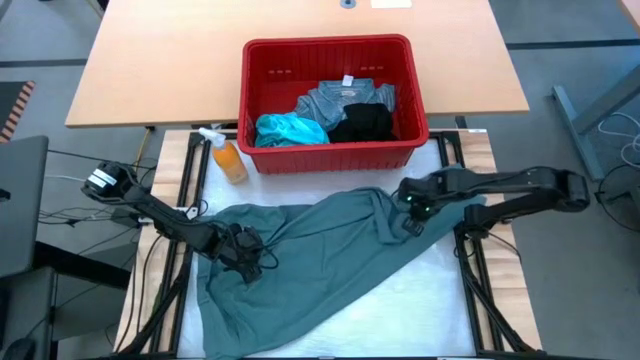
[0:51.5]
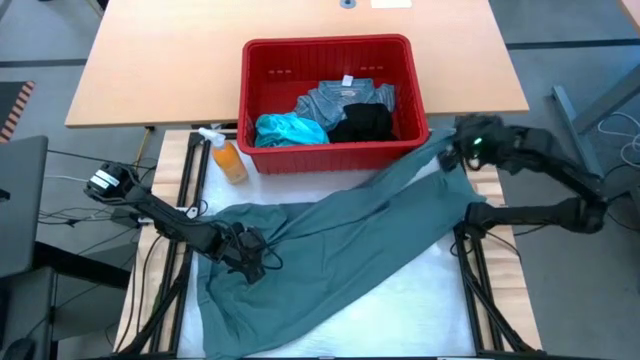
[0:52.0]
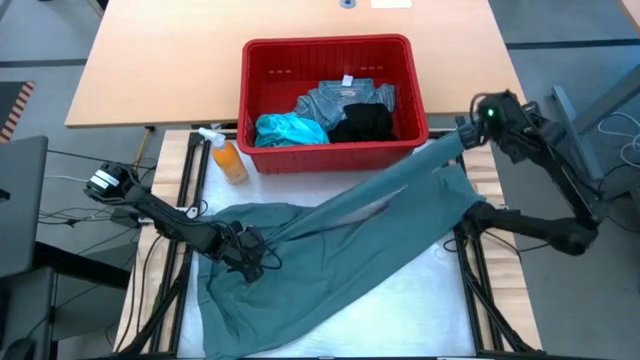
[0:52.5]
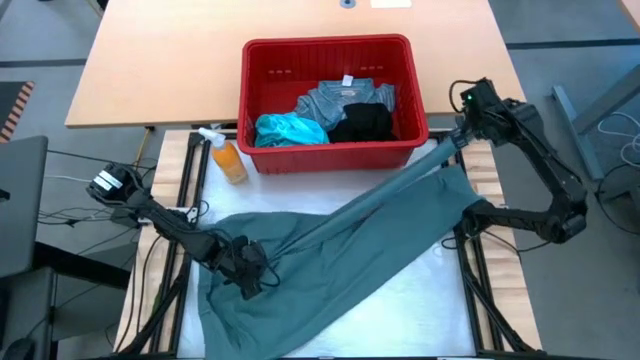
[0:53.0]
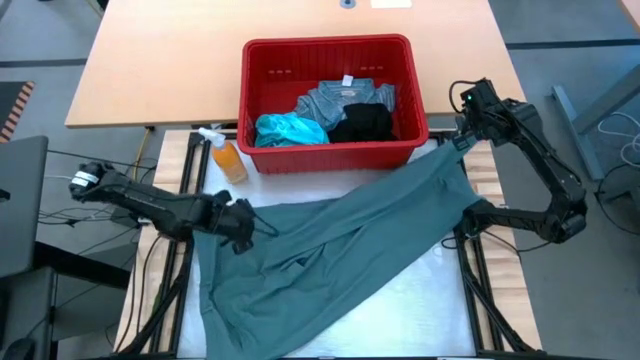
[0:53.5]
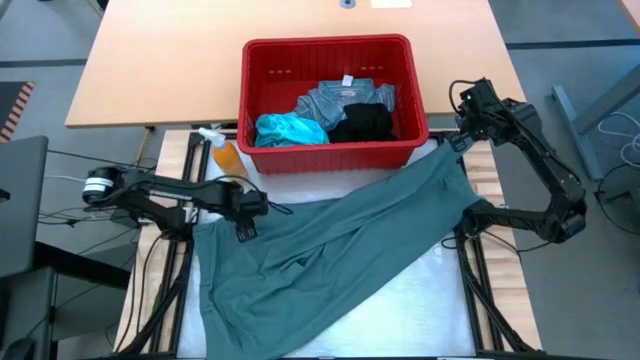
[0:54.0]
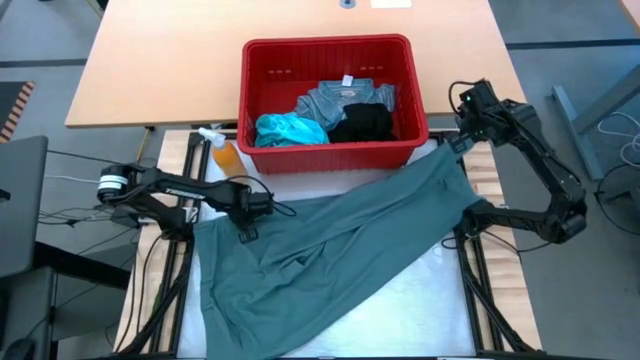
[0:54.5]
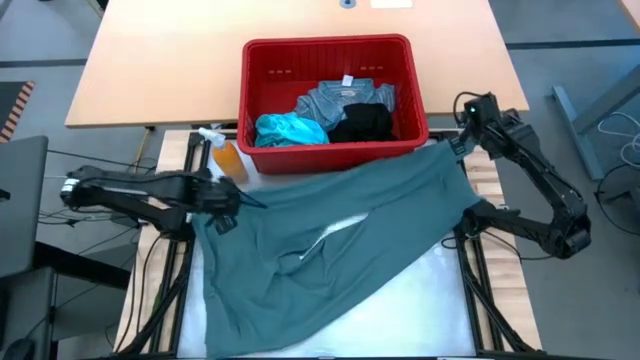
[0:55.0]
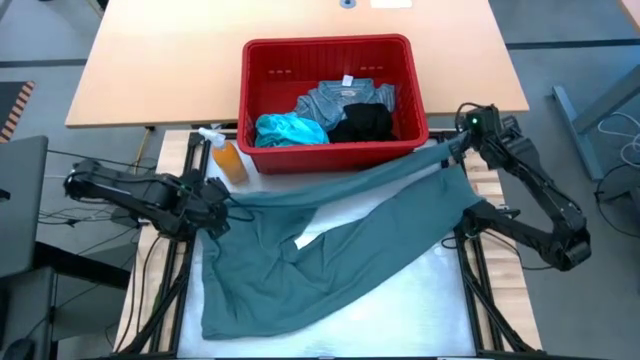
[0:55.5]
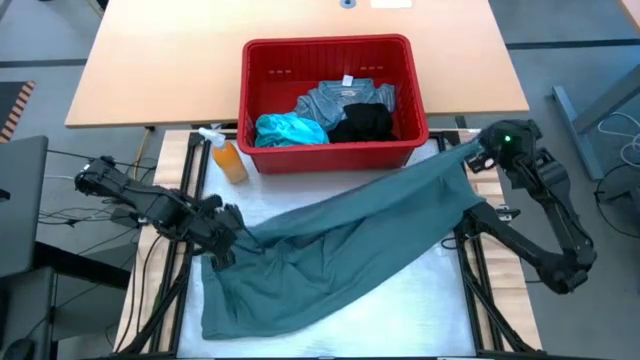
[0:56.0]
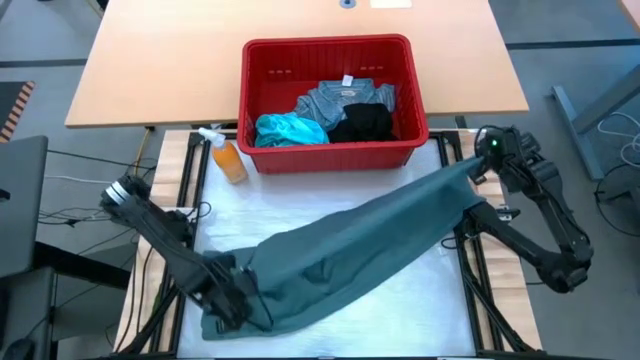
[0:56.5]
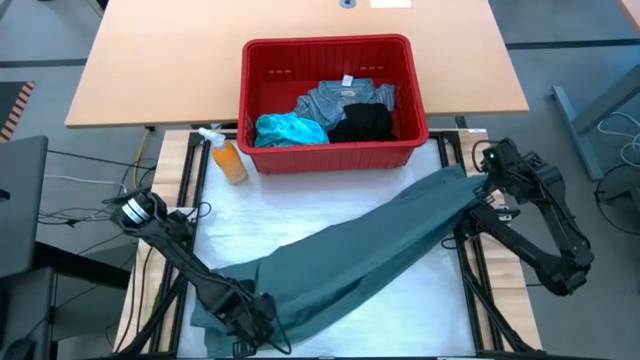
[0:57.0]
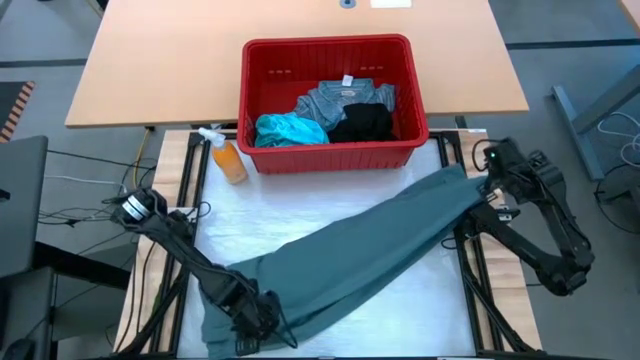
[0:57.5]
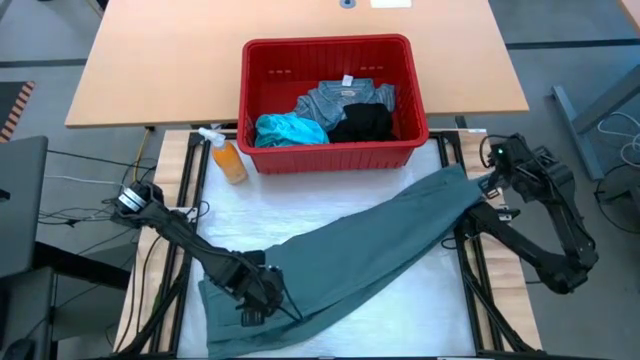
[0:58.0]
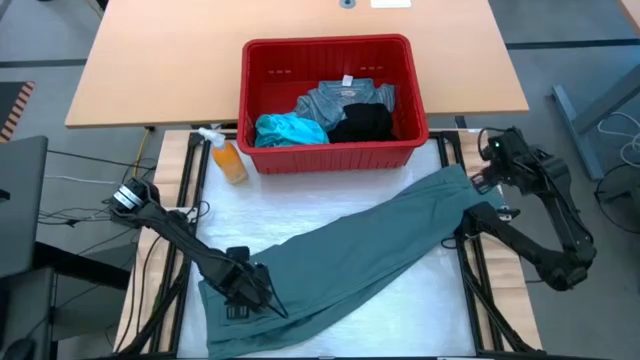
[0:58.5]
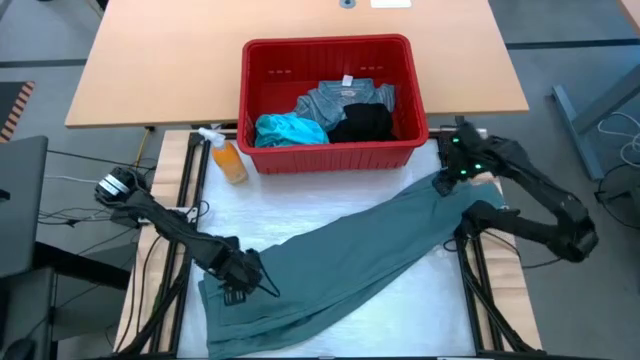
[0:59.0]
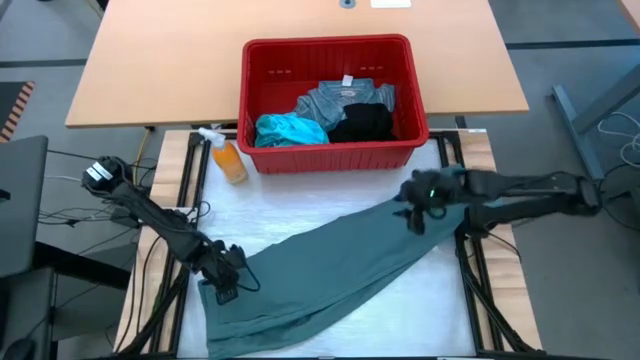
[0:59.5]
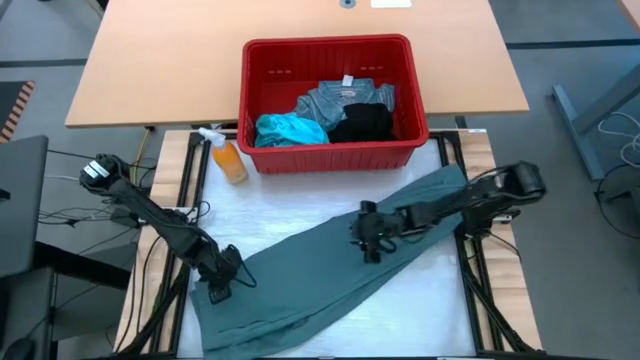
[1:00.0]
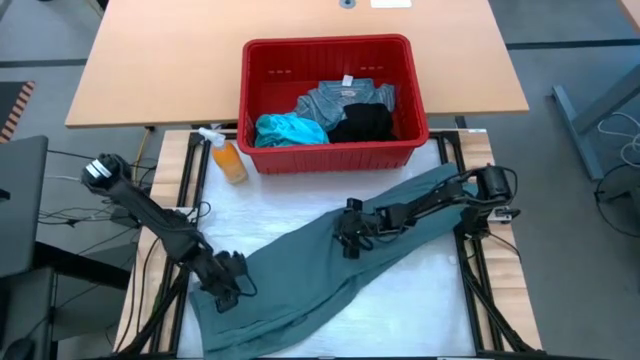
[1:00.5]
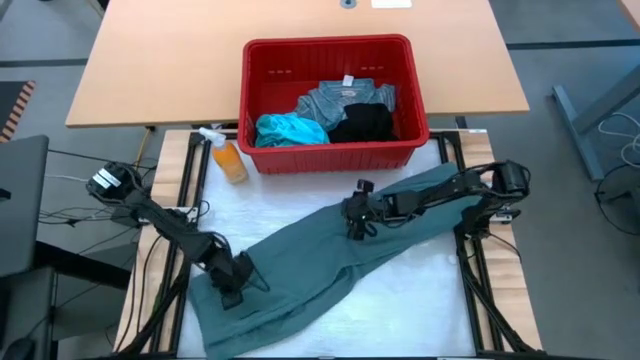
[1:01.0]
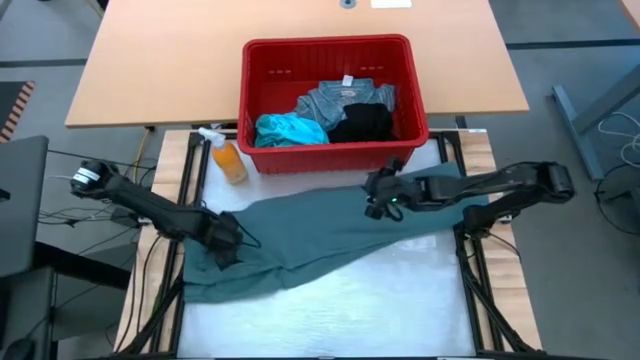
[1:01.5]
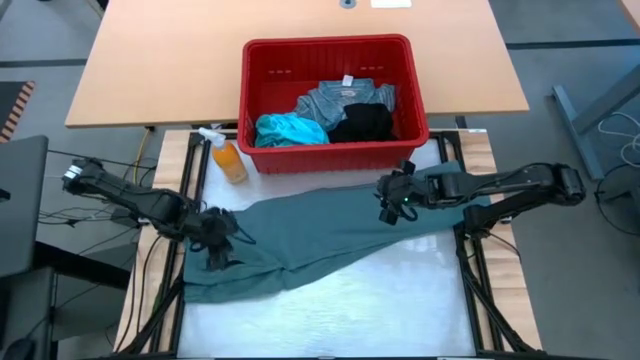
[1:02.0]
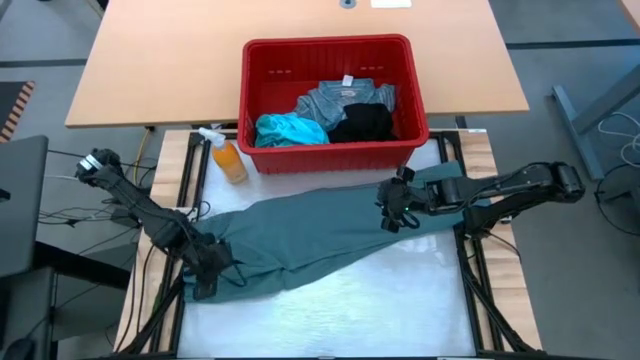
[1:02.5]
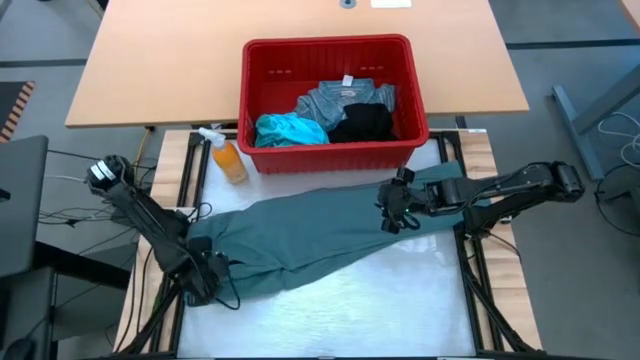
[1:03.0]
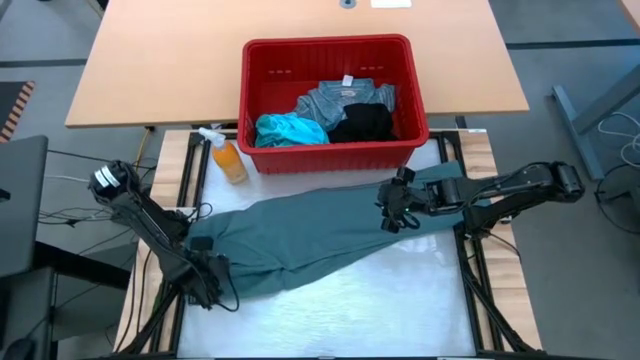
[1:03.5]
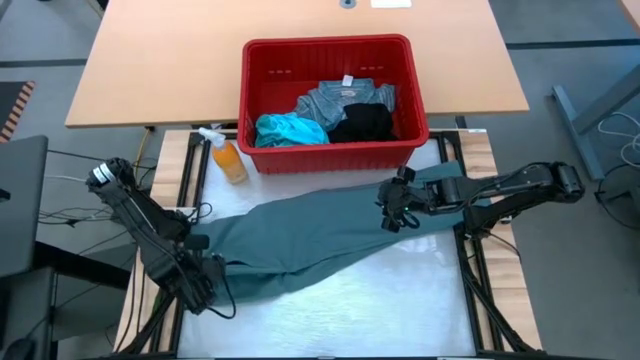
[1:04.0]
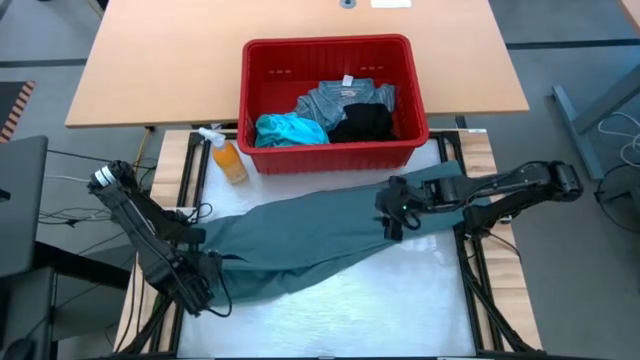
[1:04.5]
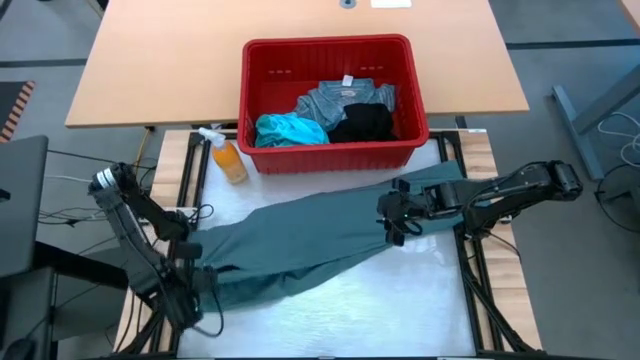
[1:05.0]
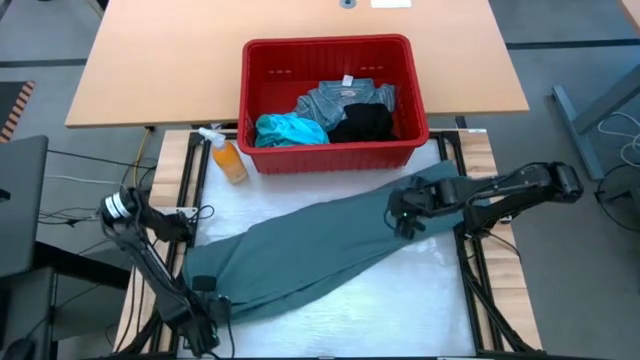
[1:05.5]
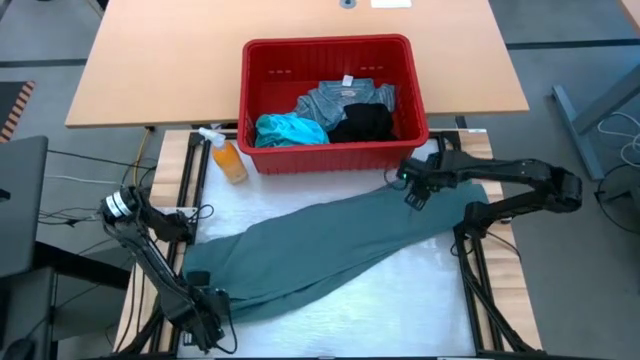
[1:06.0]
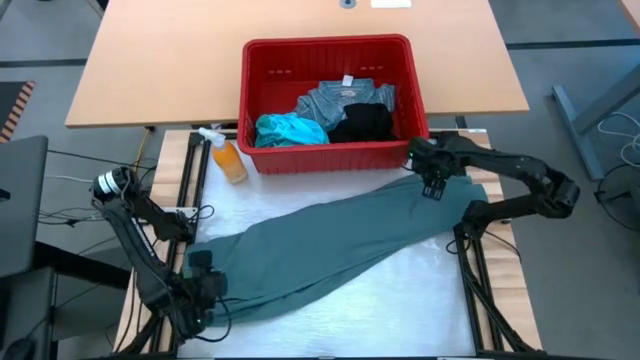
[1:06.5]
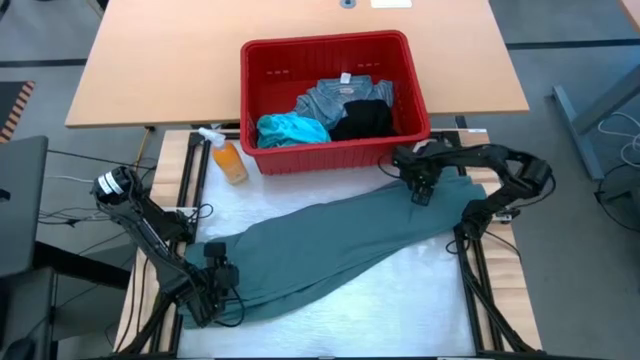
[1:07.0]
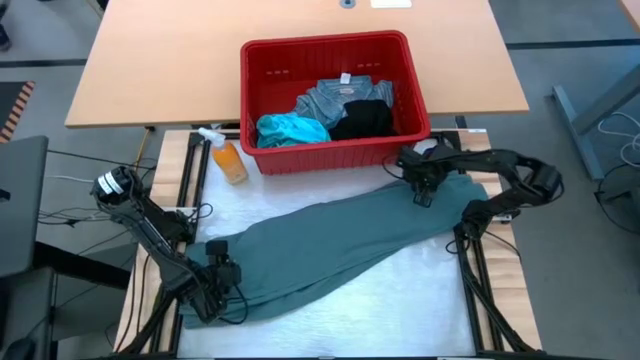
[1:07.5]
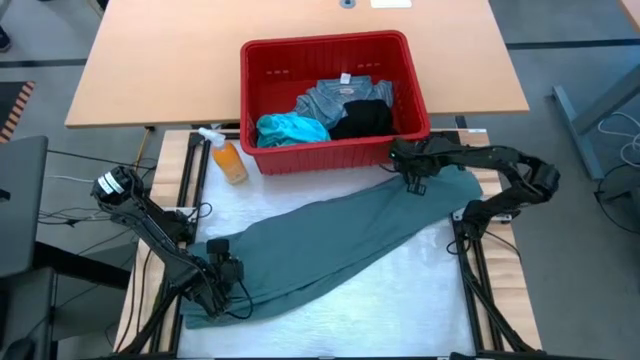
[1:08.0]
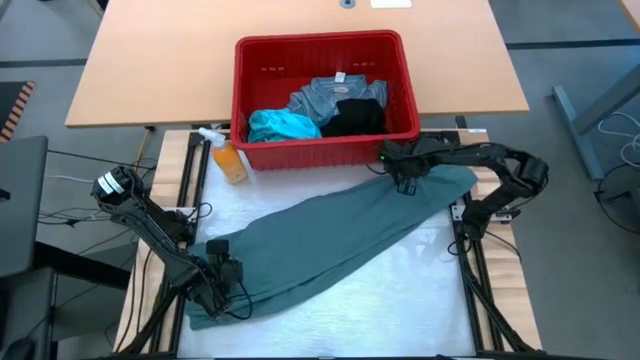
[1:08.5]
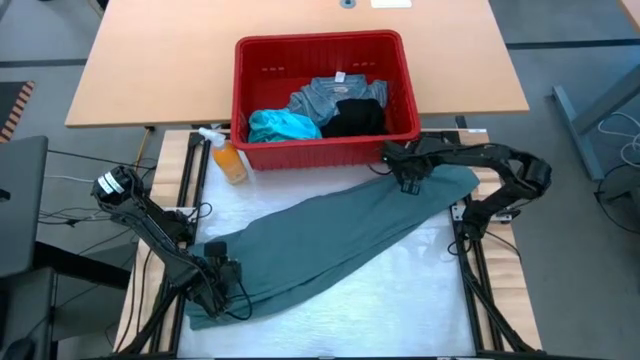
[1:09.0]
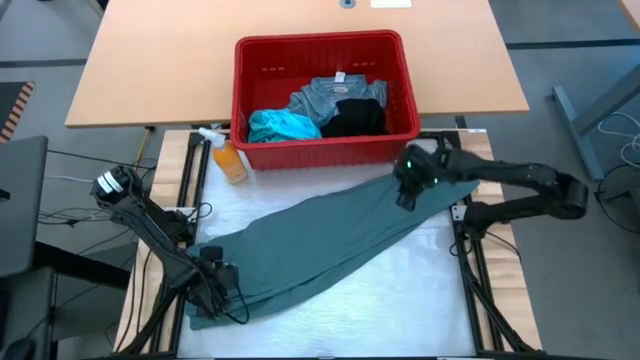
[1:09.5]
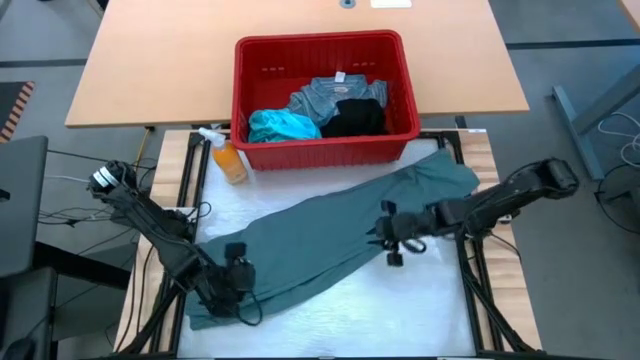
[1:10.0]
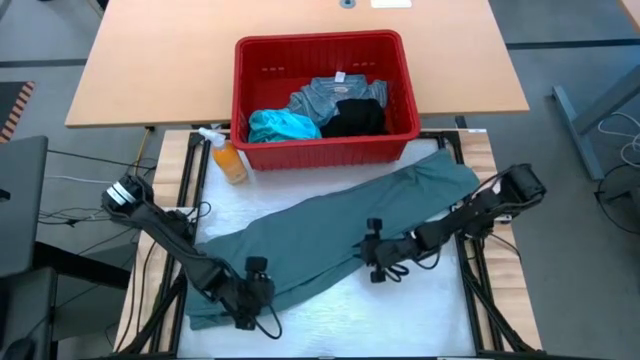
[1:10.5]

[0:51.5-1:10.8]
Task: Fold Laundry from Bin
Fold the gray pants

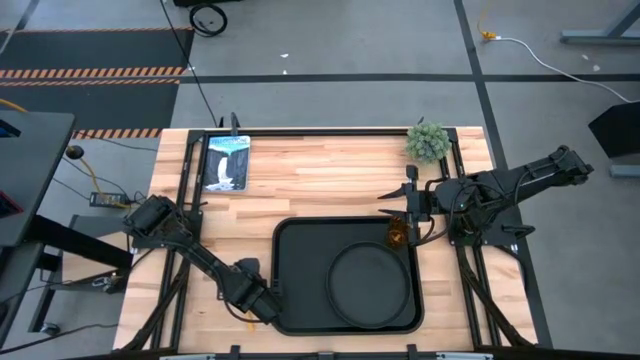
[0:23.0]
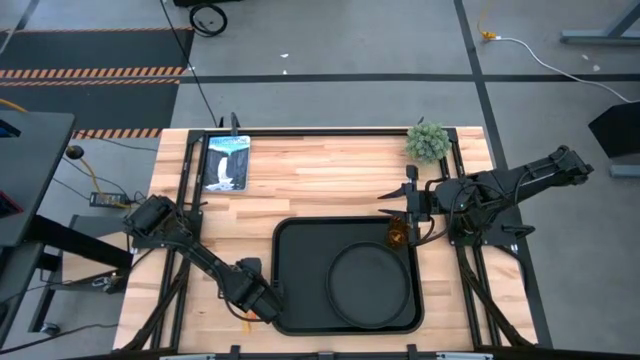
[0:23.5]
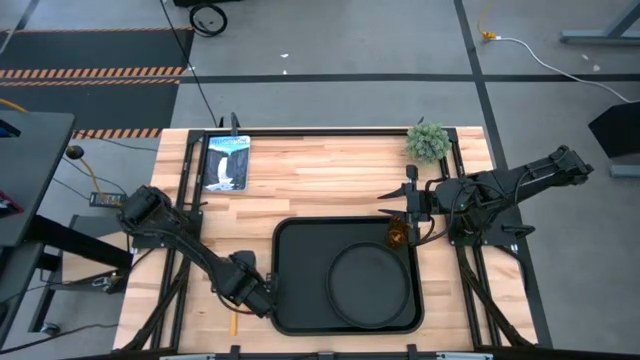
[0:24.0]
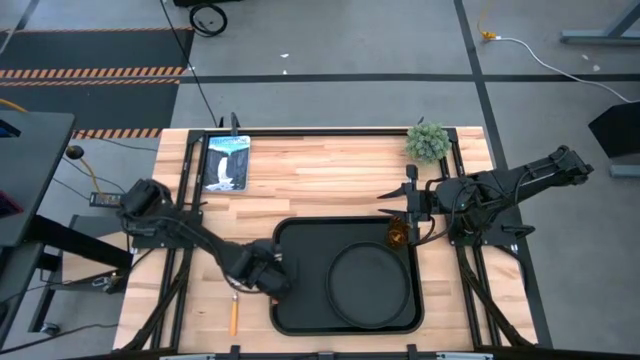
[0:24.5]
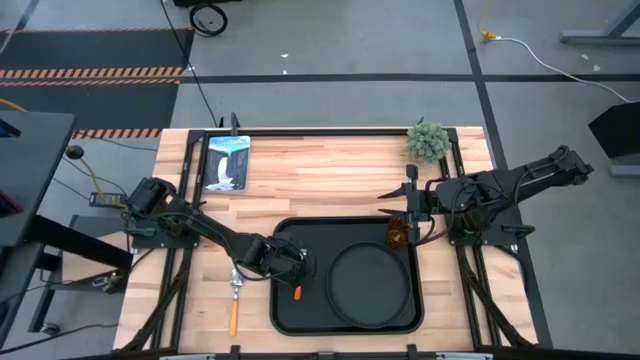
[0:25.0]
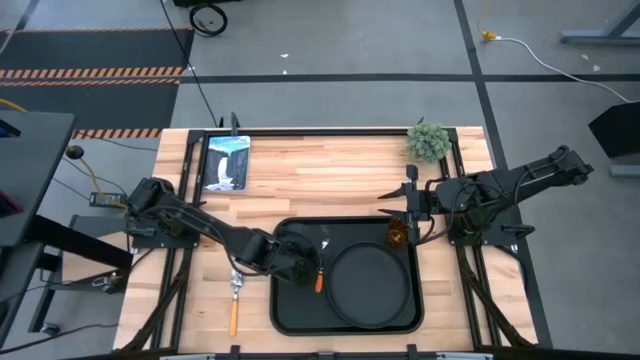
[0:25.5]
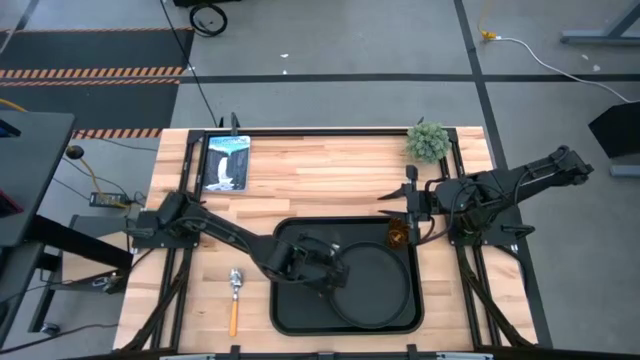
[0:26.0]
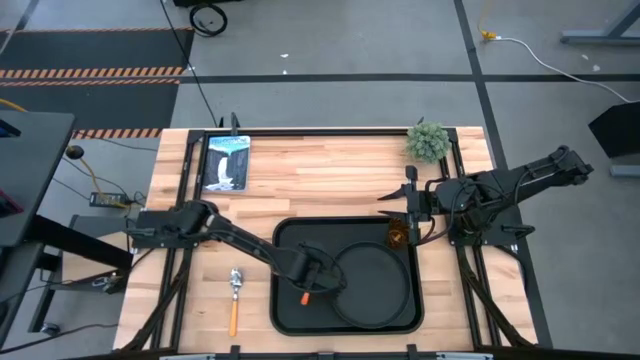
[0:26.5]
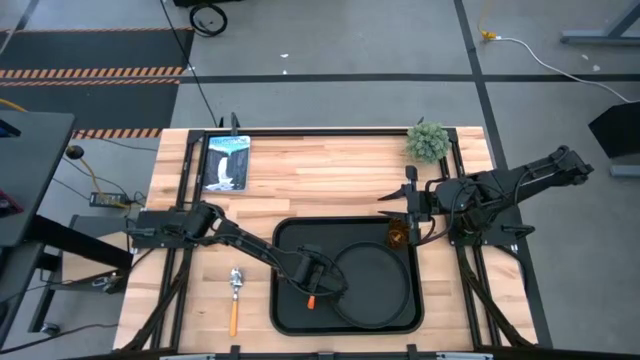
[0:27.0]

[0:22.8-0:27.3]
Task: Pick and place plate/cup/fork/spoon on tray
Put the orange fork on the black serving tray to the left side of the black plate
